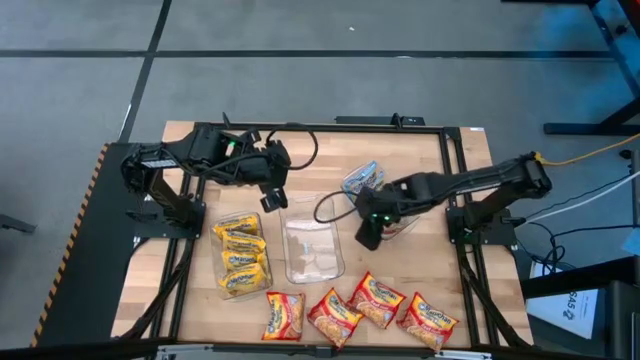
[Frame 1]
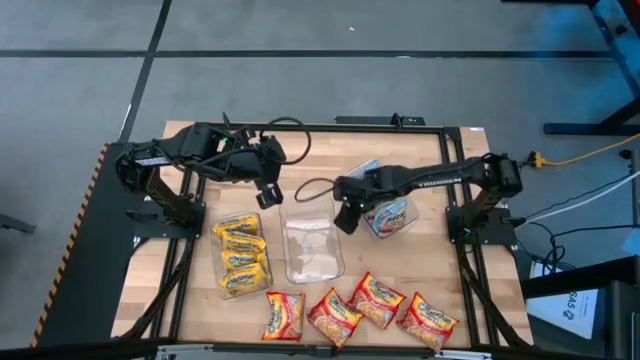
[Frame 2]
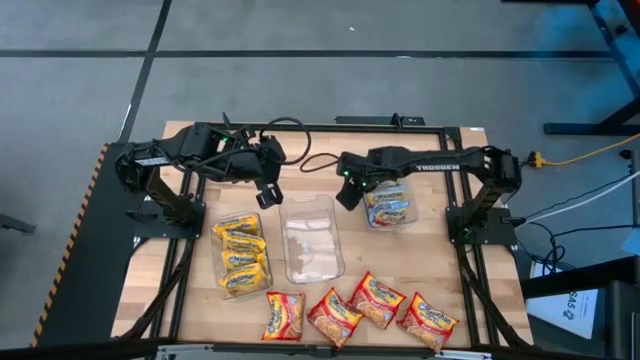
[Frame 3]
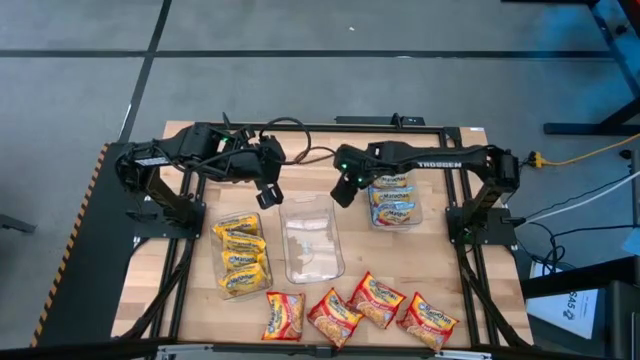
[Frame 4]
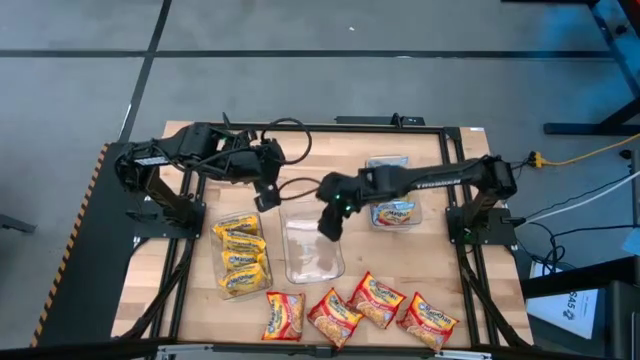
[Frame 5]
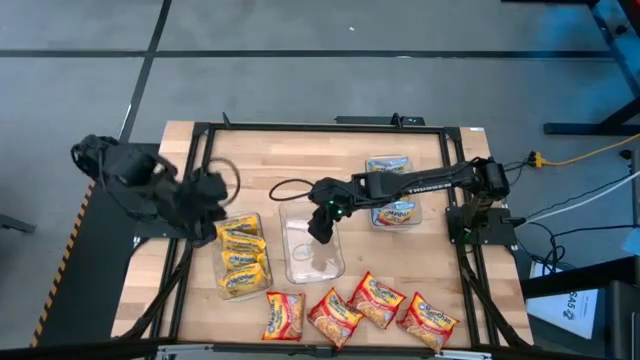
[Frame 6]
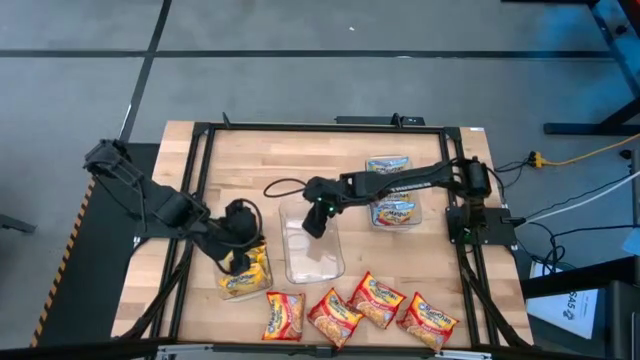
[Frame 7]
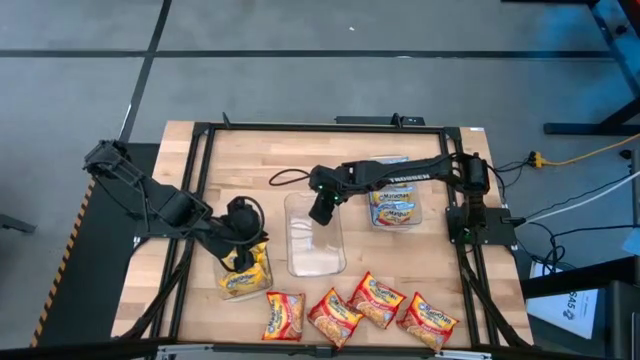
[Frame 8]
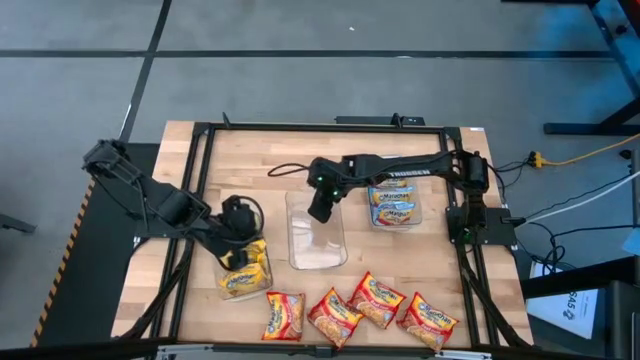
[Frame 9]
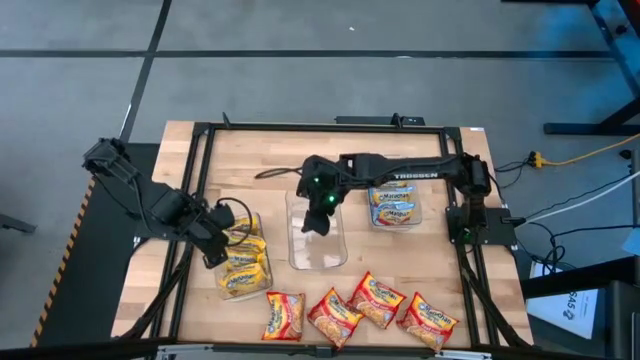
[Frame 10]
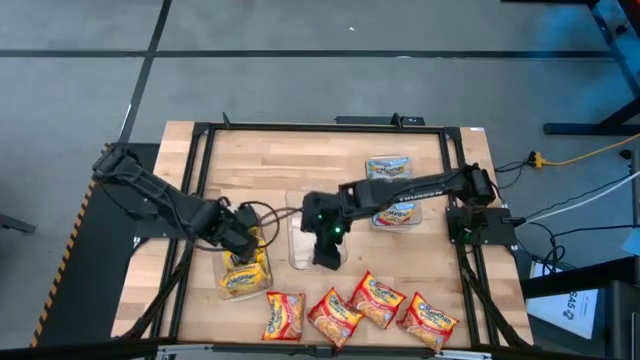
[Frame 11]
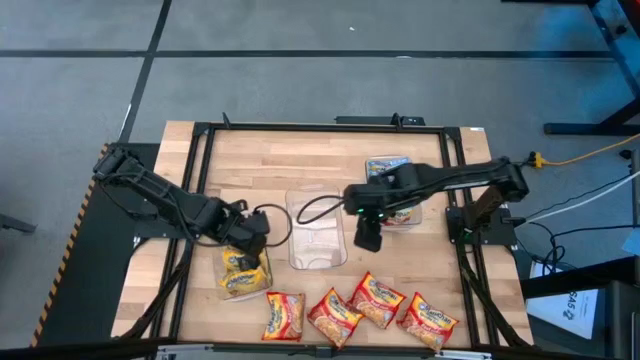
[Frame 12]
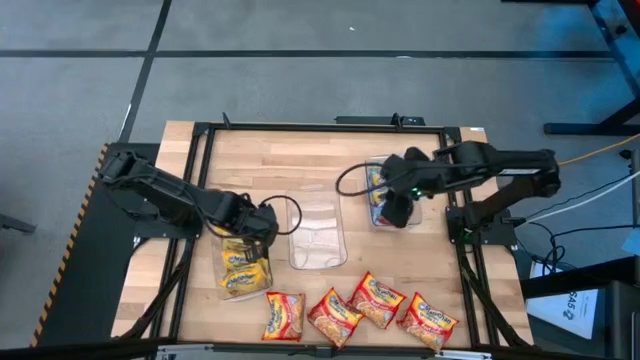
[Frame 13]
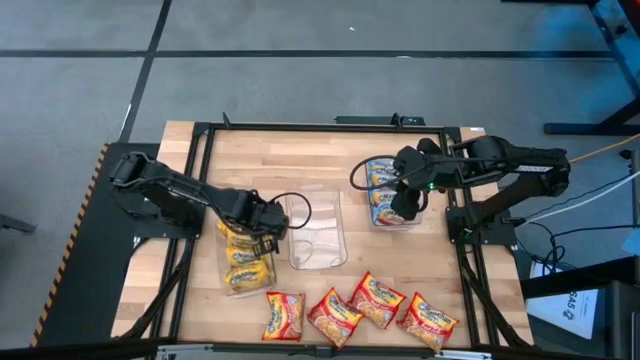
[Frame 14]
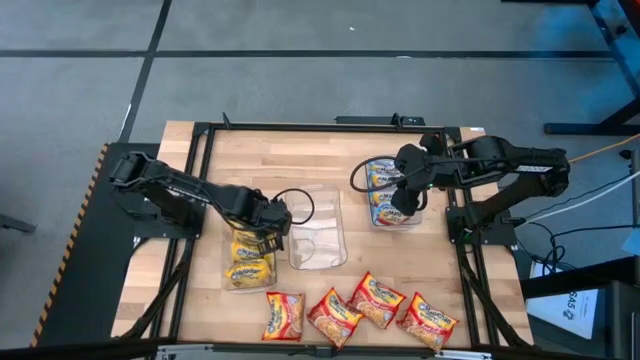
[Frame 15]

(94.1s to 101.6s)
Task: Sort Maruchan noodles
Adjust the transparent bins

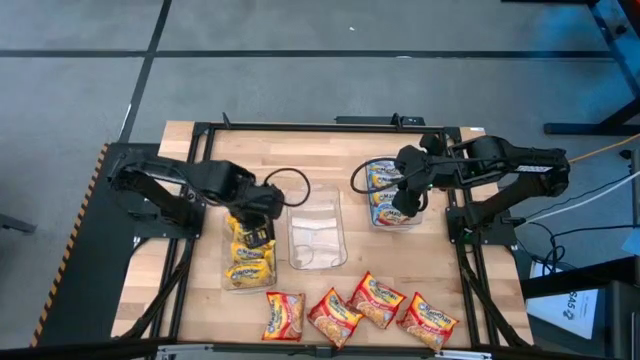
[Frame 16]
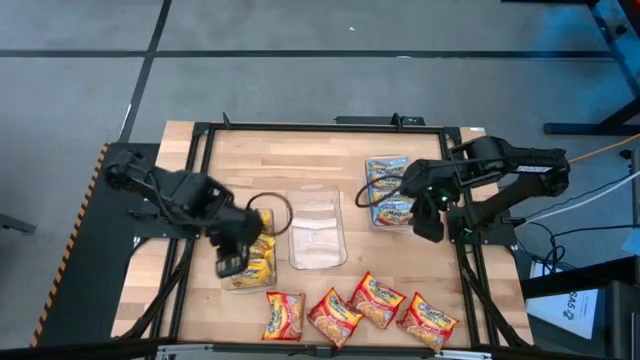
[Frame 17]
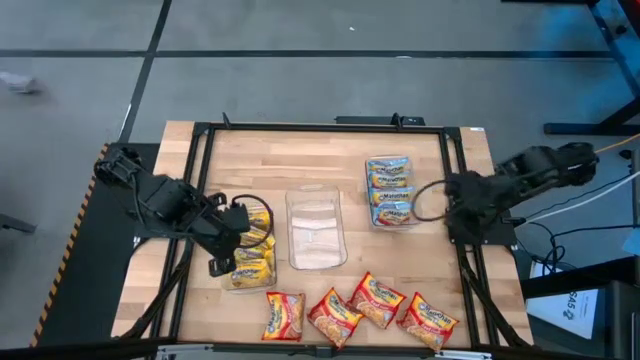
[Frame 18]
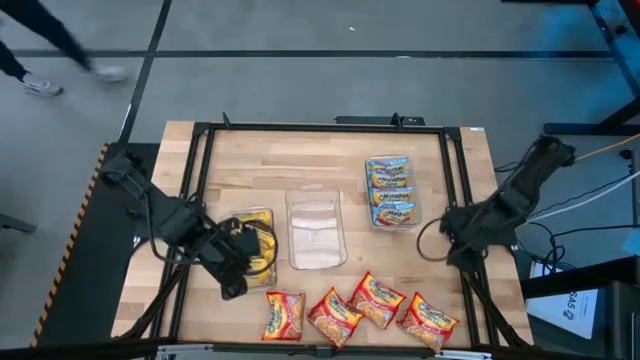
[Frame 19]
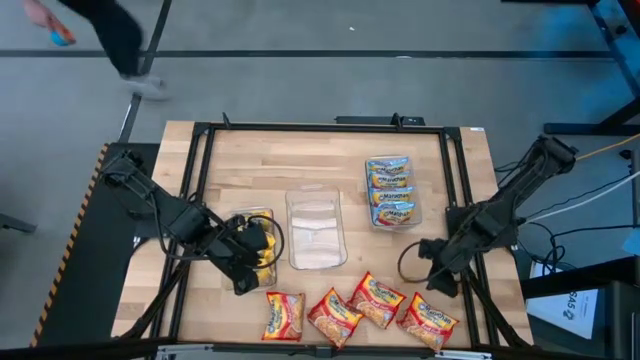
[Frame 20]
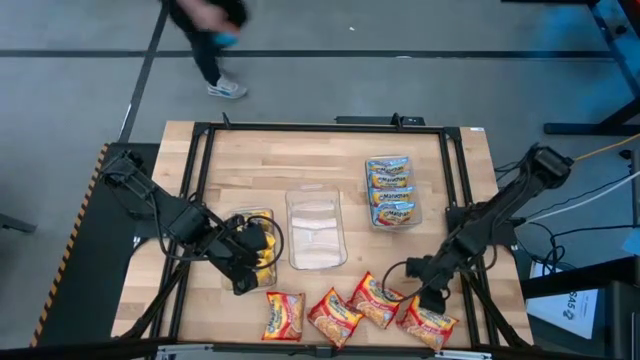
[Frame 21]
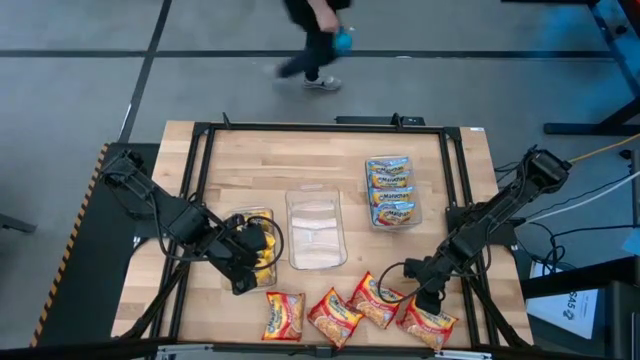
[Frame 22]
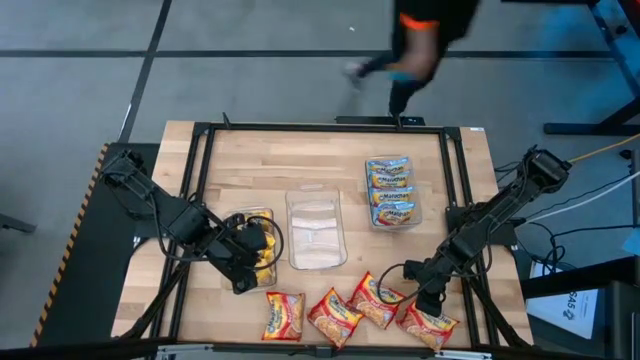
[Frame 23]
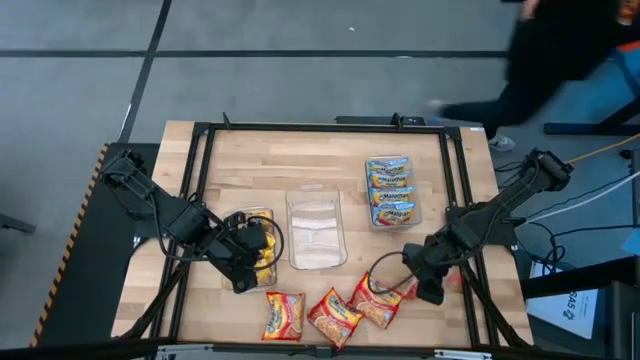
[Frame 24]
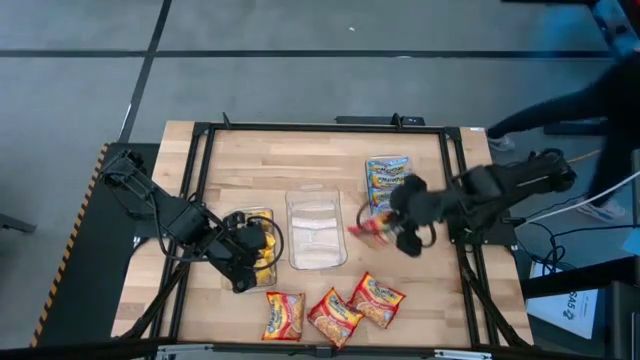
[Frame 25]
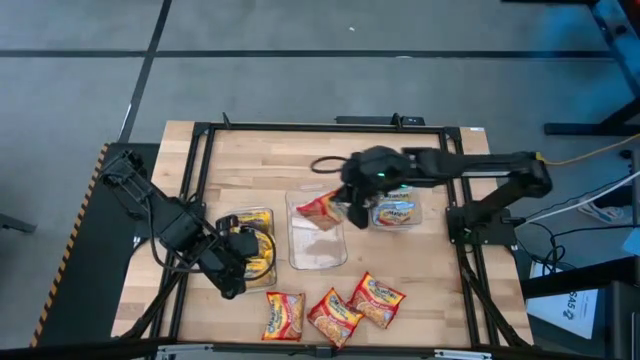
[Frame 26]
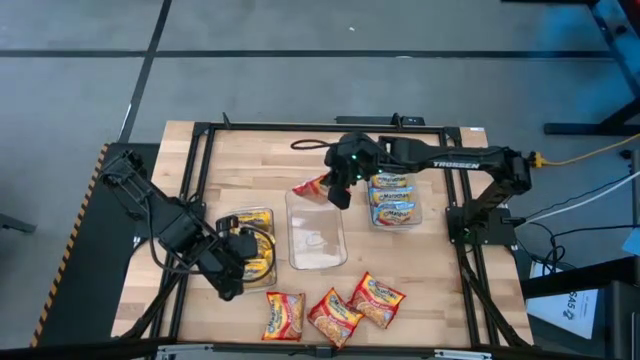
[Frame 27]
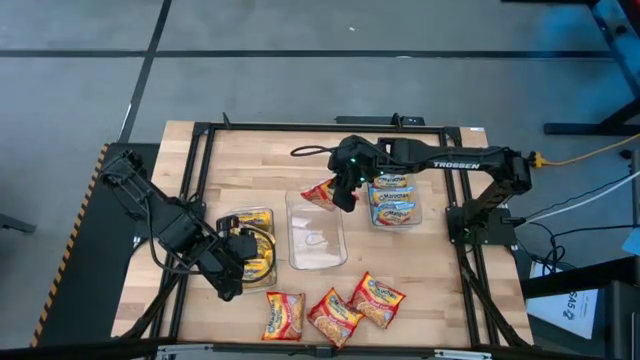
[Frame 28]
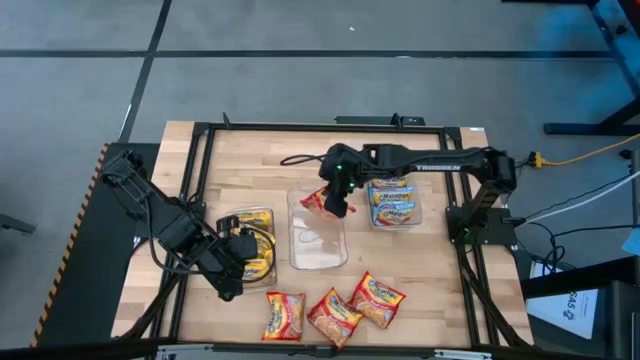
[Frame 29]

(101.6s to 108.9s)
Put the noodle pack into the middle transparent bin

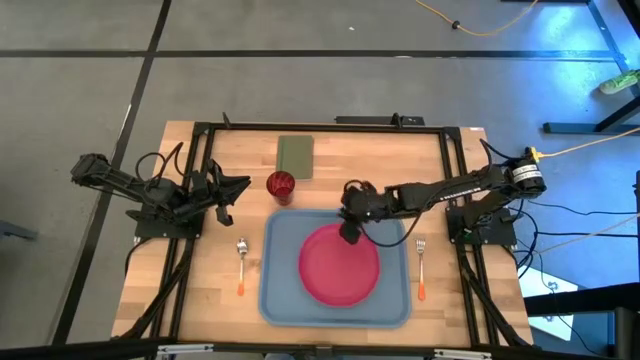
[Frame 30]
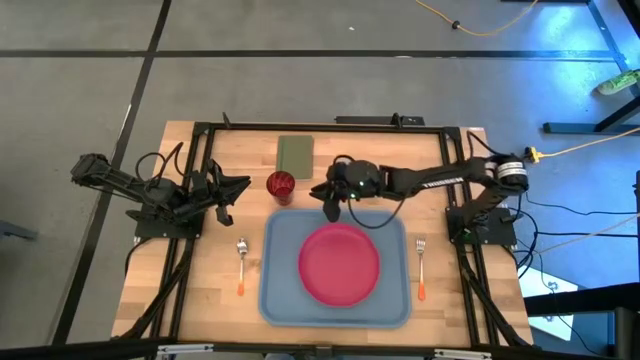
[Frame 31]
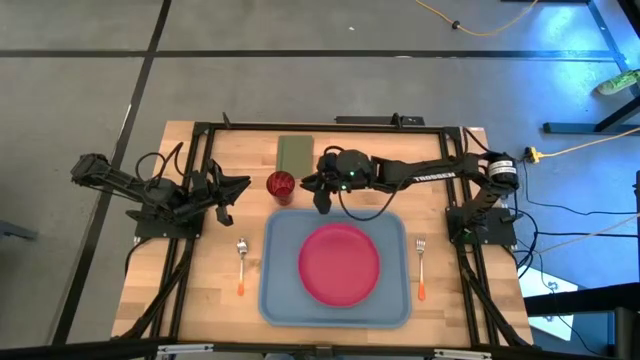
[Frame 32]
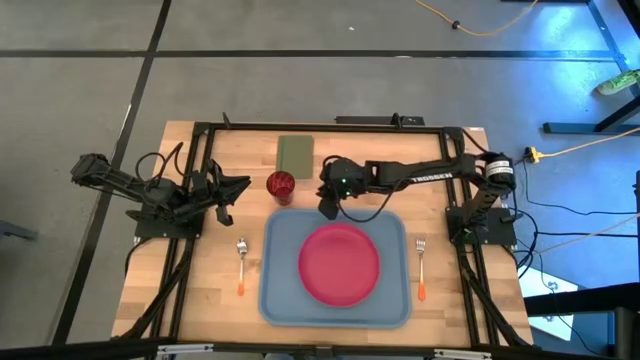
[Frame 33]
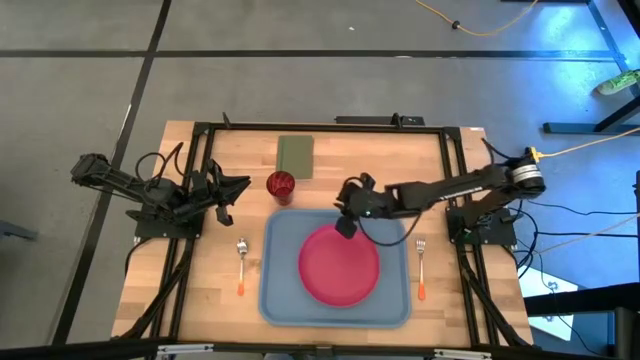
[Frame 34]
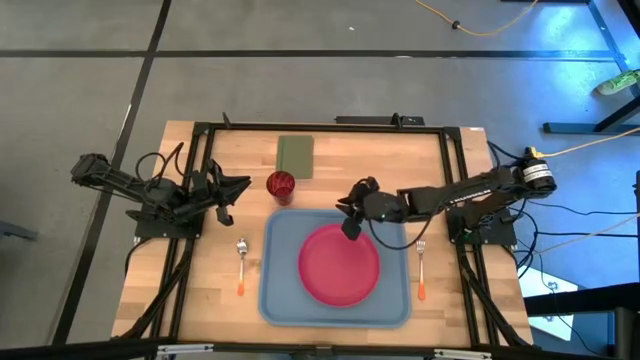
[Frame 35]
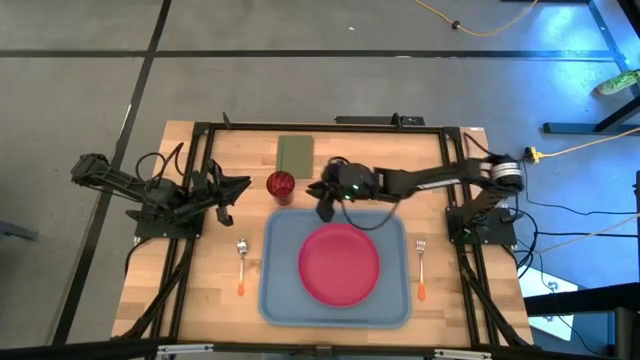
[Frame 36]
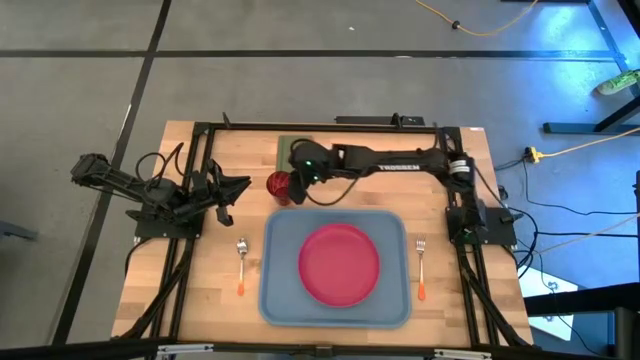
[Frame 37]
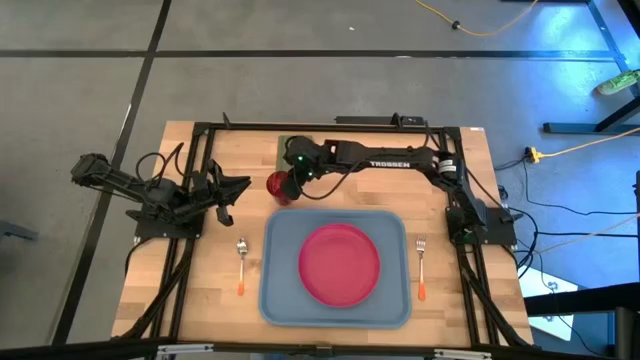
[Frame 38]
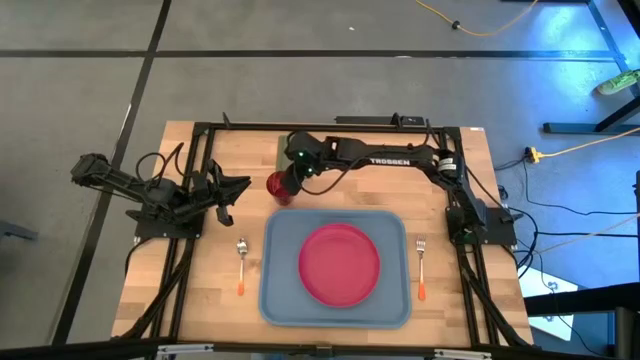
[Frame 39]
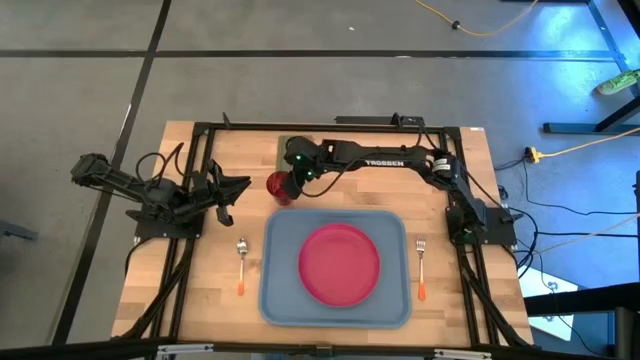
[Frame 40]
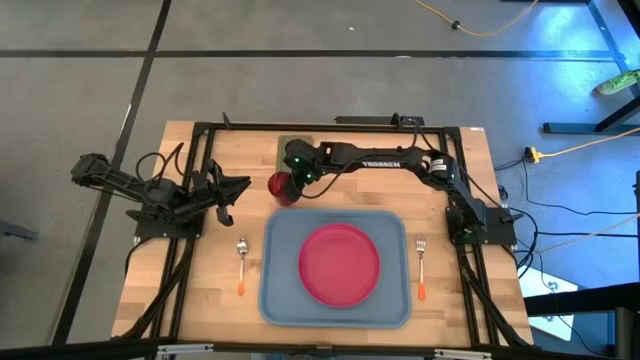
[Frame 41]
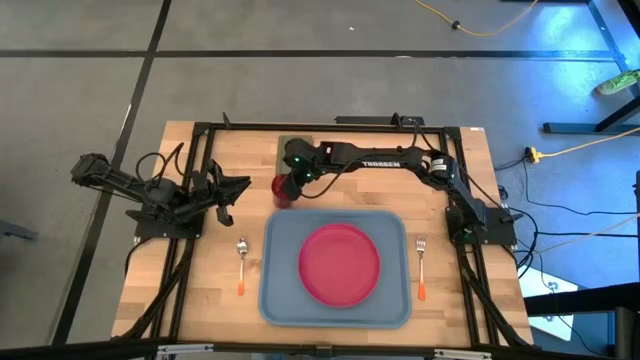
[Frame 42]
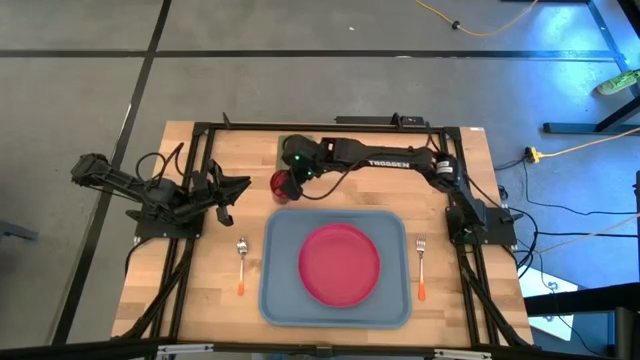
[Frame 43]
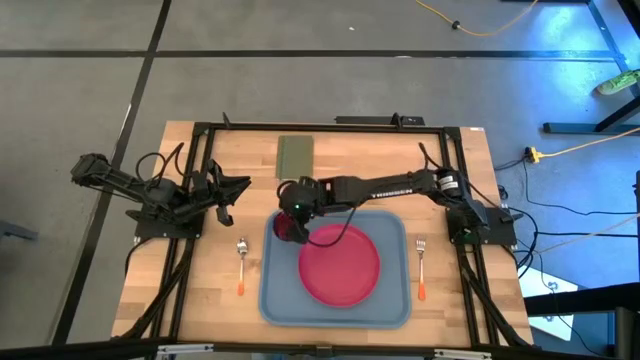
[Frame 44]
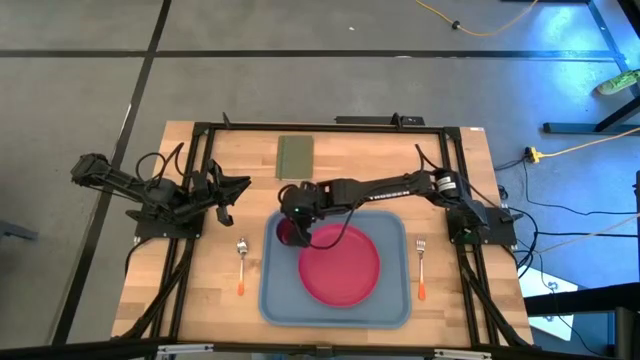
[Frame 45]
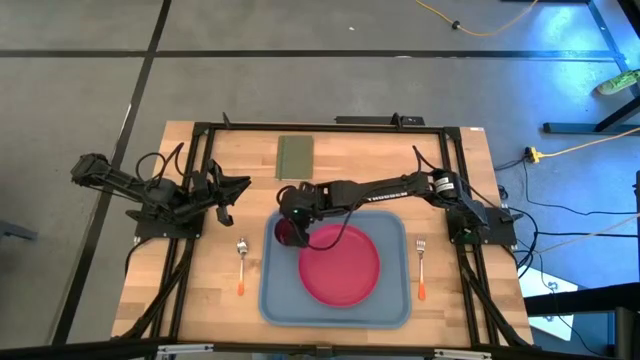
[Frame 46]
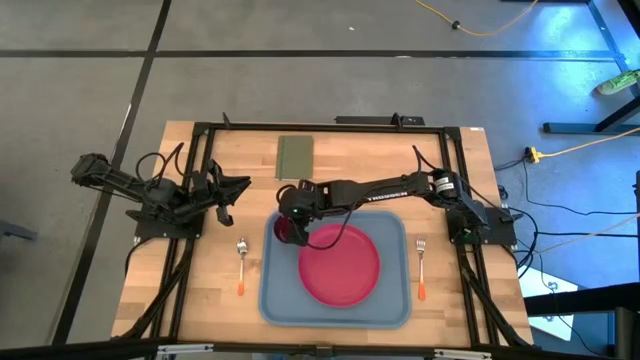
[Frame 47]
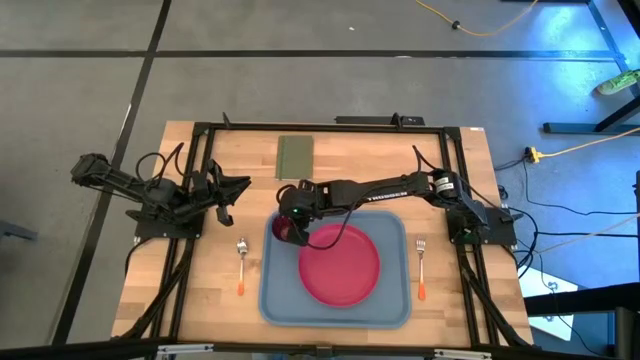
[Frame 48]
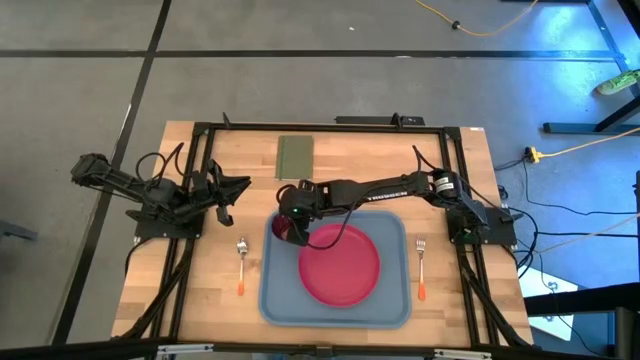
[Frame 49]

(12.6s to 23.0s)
Task: Pick and place plate/cup/fork/spoon on tray
Put the red cup on the blue tray to the top left of the pink plate
